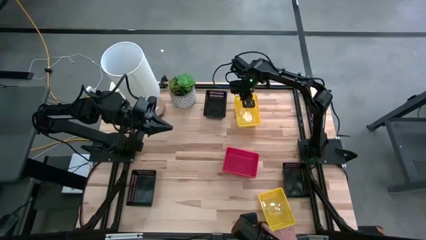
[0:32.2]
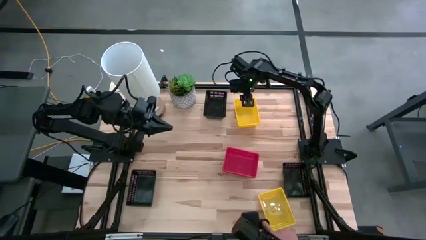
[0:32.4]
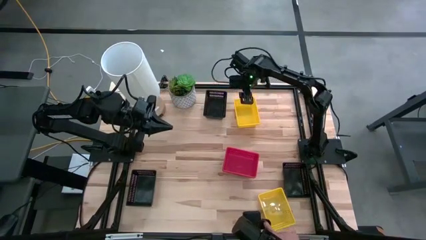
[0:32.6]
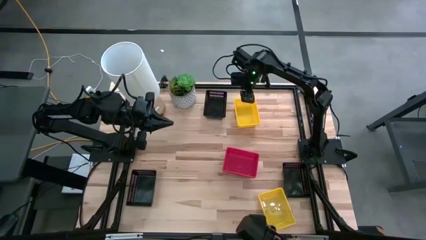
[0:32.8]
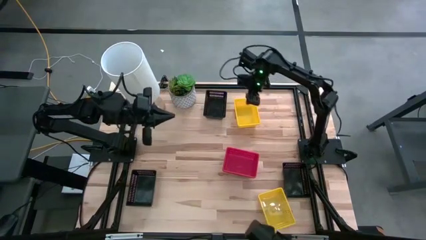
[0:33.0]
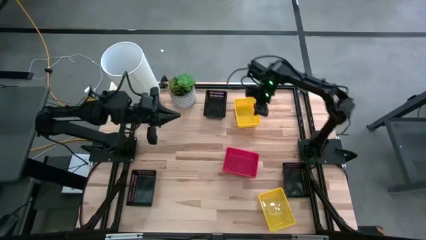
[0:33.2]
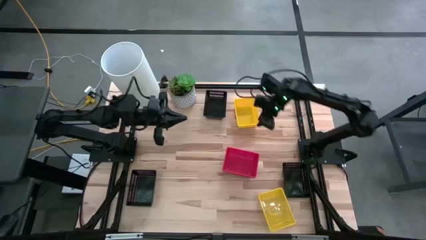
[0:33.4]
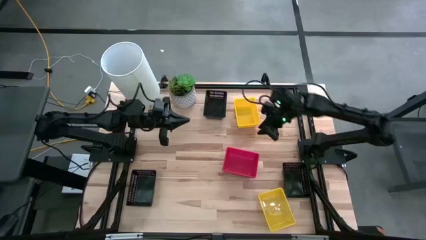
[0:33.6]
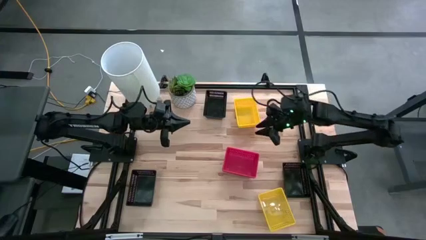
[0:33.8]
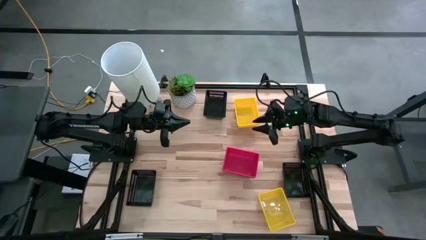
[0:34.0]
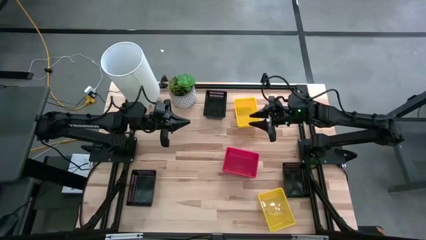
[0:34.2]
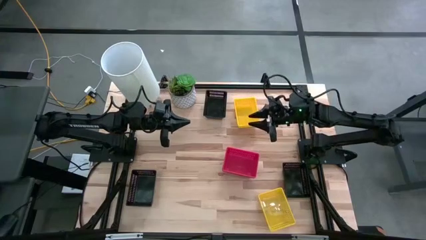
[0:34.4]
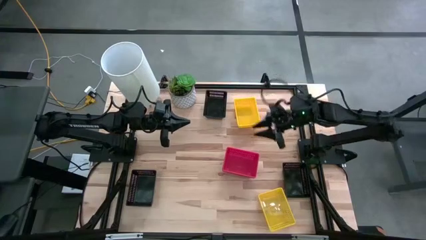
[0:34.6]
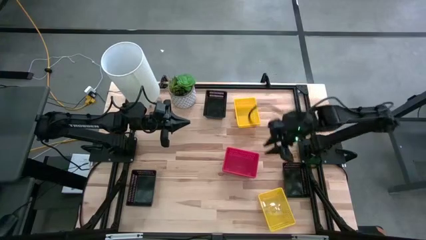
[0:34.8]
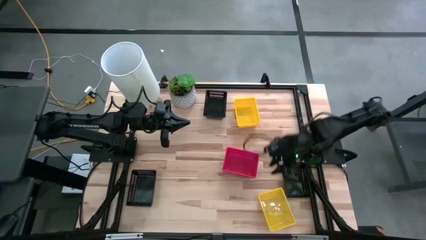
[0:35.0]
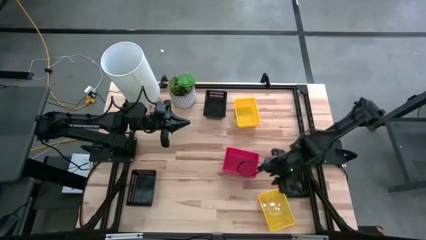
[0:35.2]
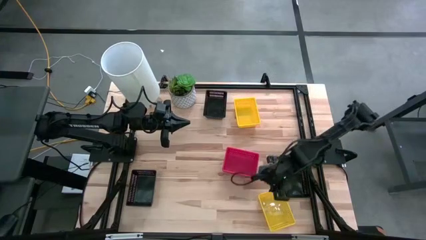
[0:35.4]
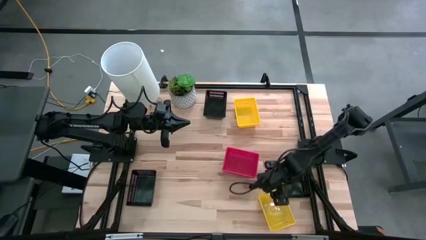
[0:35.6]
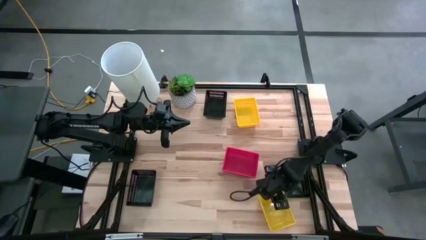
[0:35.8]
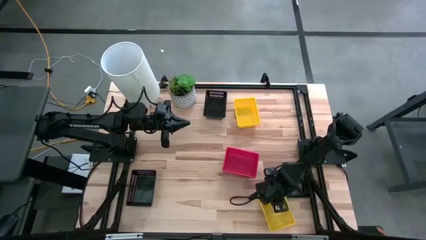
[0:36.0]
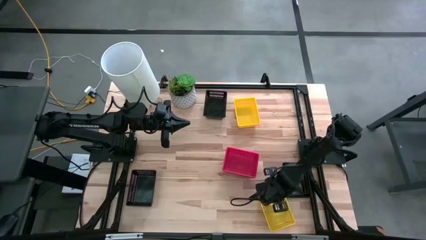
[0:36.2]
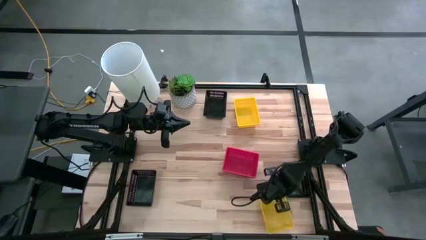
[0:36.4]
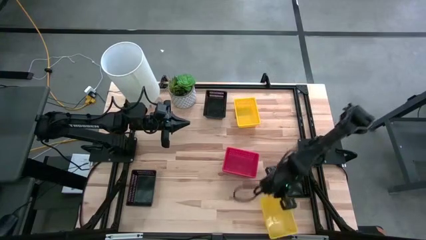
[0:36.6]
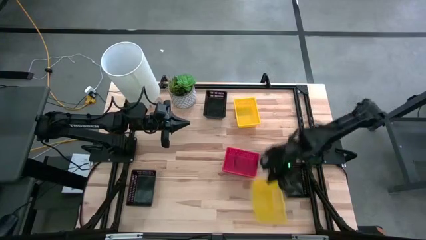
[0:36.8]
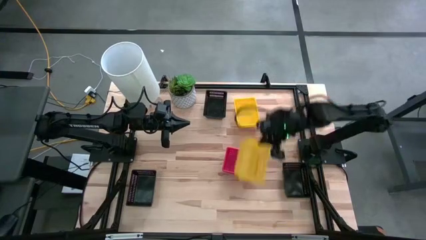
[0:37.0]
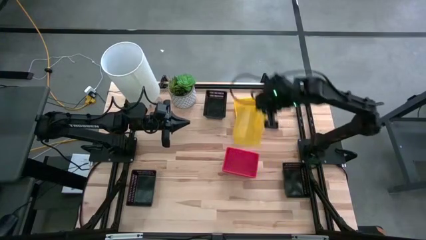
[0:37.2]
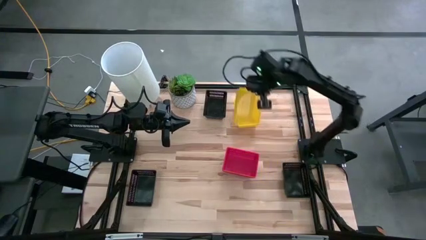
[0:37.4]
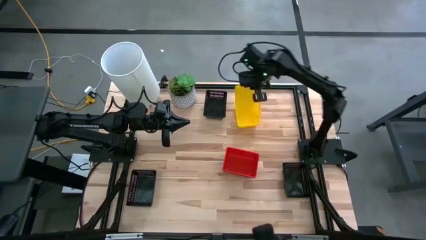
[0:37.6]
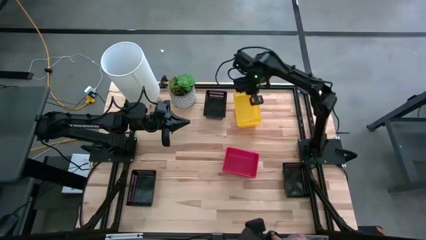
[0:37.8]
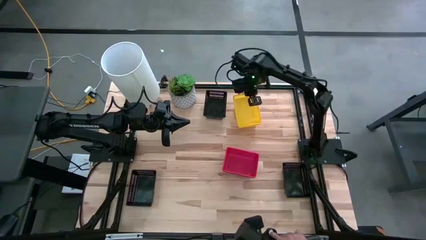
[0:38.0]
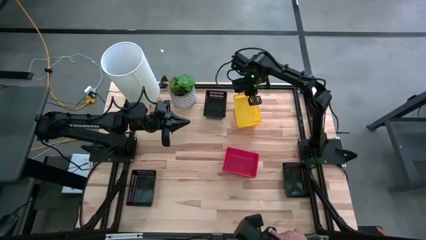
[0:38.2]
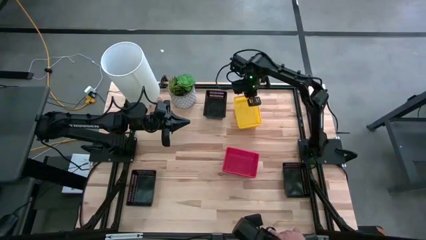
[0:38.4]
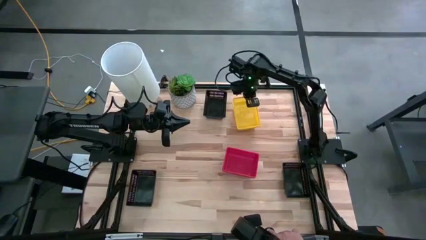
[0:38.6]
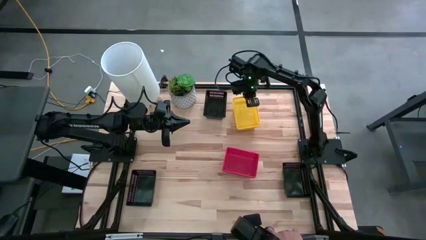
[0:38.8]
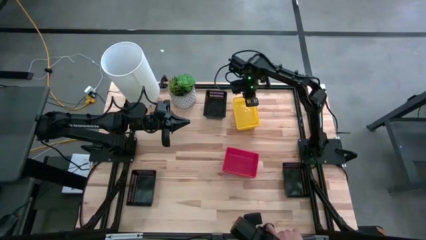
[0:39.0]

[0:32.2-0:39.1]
Stack the bottom yellow bin on top of the top yellow bin on the table

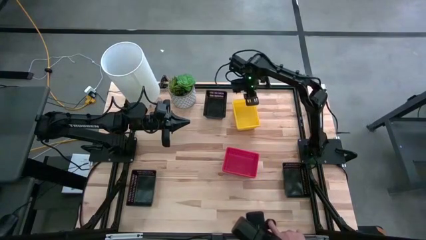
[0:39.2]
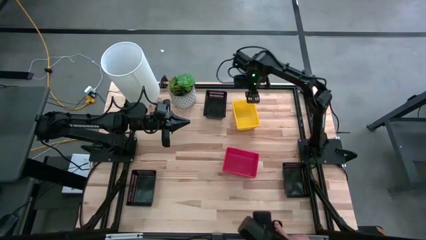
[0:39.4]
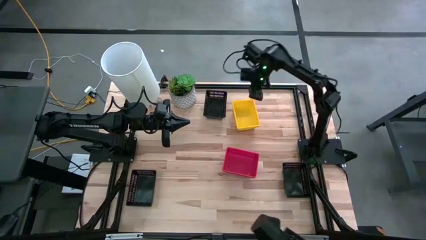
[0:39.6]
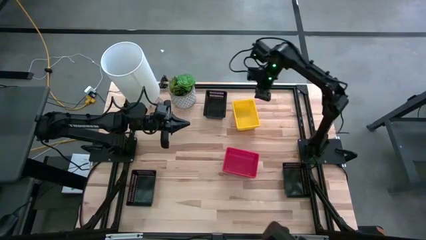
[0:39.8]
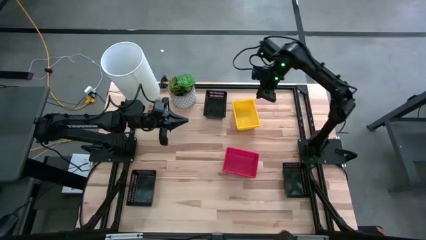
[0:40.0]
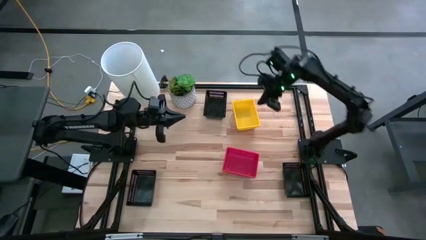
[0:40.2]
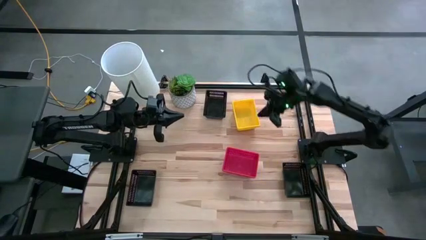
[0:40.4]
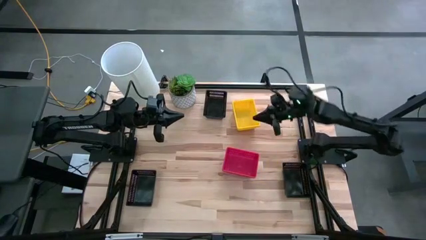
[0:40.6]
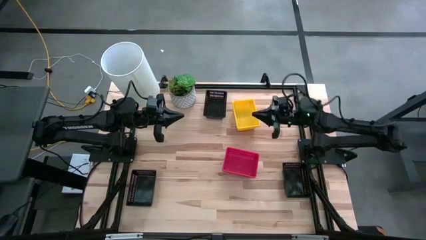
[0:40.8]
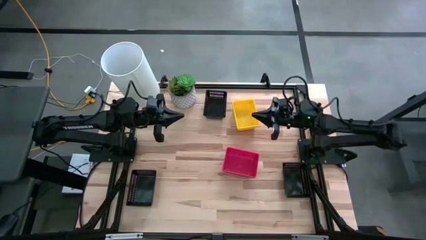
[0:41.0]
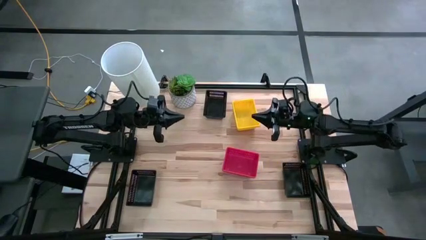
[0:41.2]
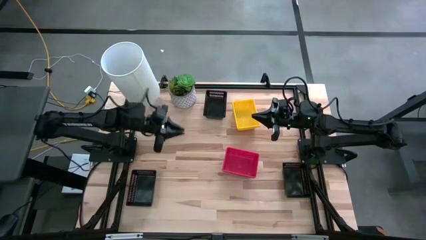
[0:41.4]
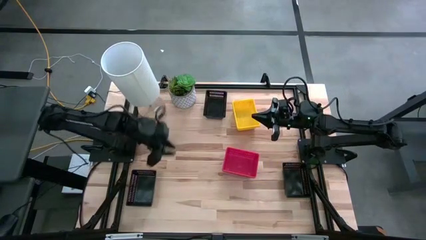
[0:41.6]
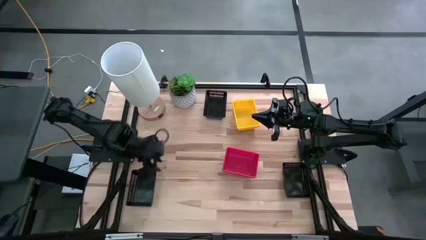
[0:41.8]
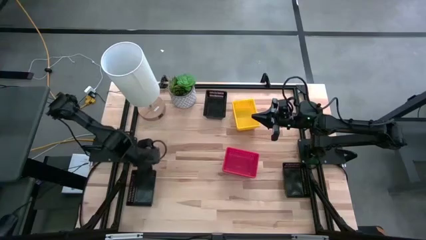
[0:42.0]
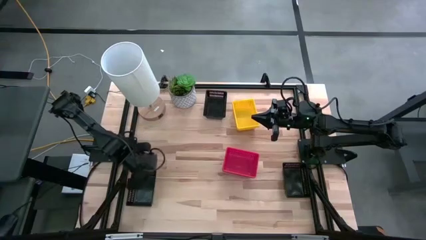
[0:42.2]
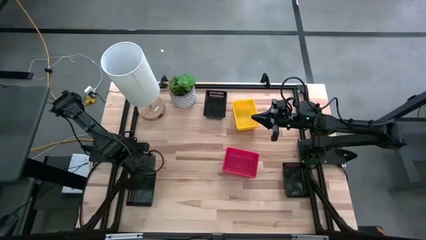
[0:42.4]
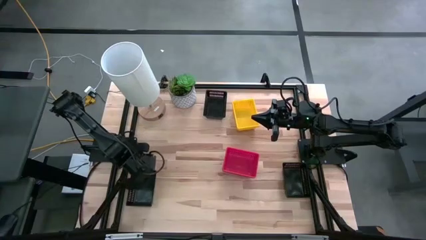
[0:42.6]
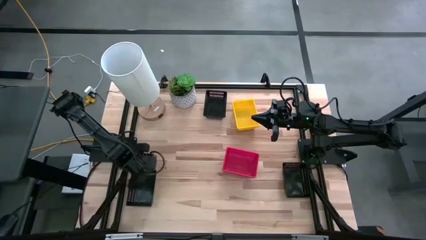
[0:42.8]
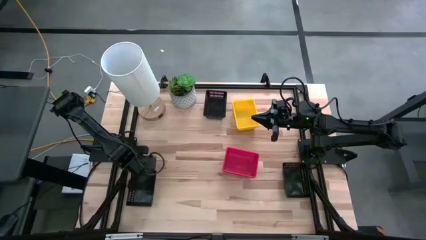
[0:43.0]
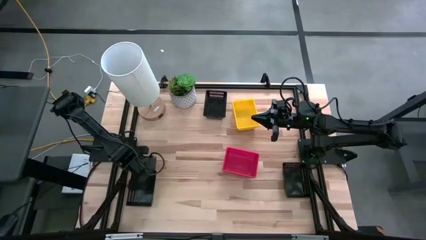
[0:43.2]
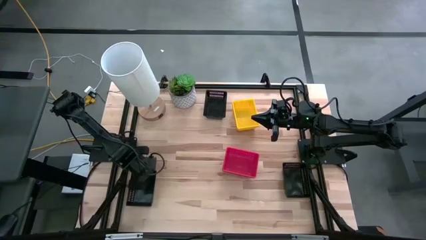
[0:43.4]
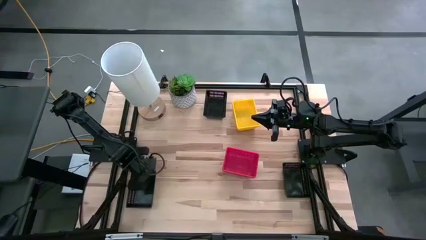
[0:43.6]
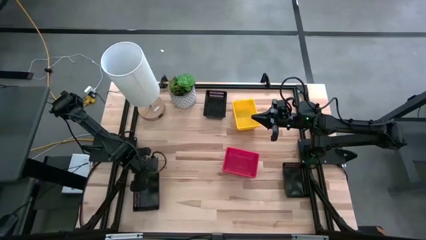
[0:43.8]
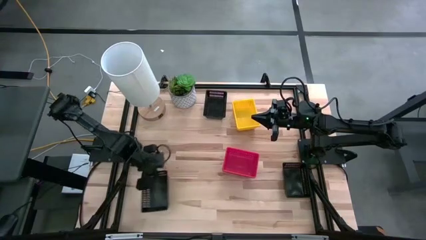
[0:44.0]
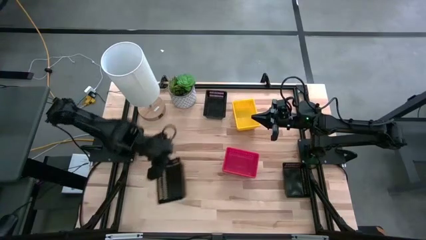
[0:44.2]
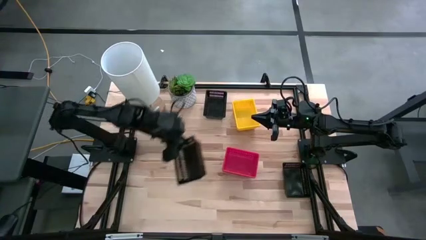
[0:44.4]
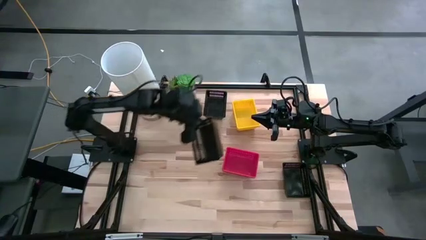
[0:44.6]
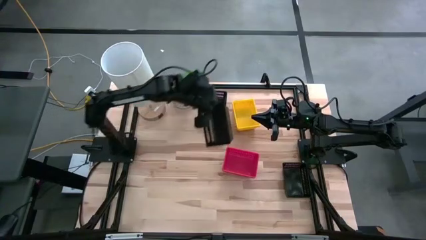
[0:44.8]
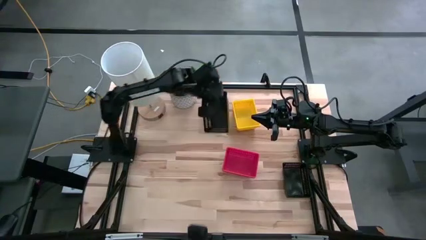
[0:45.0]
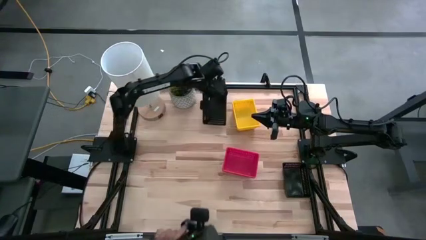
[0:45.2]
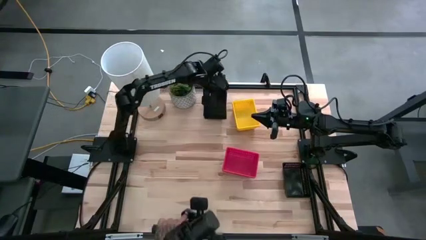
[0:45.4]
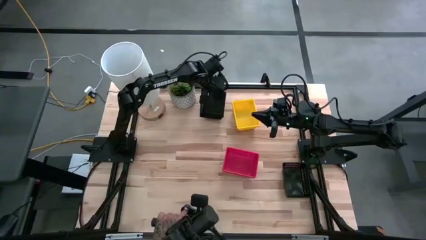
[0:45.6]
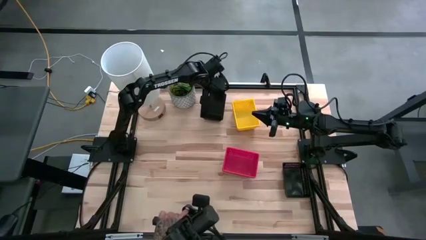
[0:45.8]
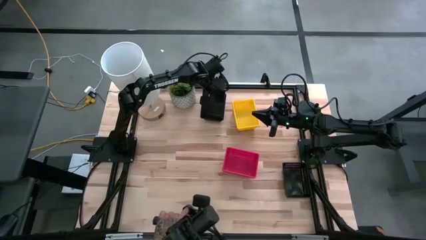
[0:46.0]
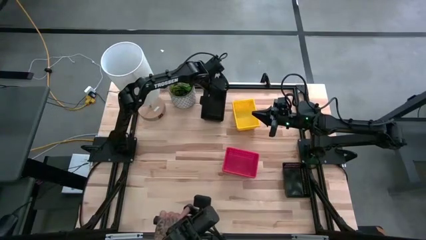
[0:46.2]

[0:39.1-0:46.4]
Stack the bottom left black bin on top of the top black bin on the table

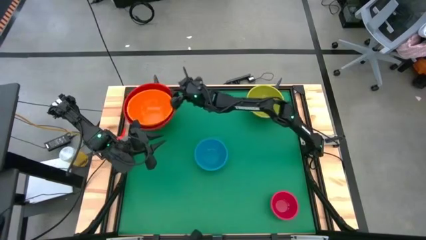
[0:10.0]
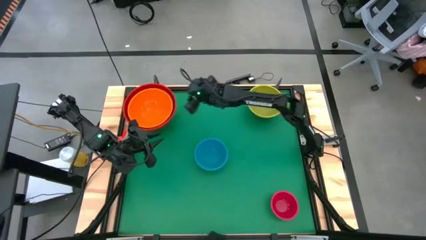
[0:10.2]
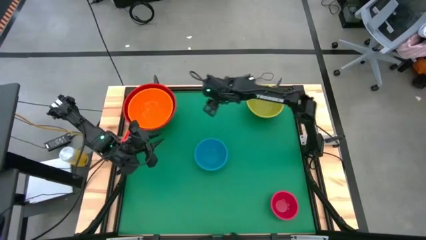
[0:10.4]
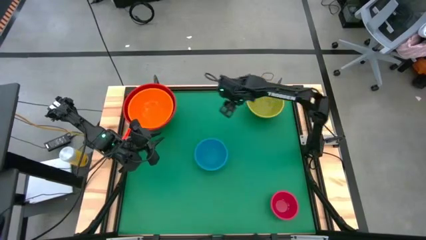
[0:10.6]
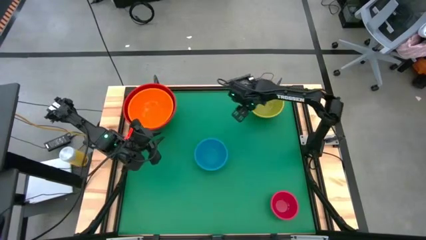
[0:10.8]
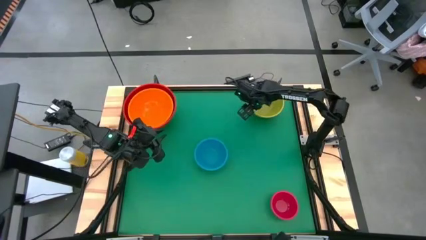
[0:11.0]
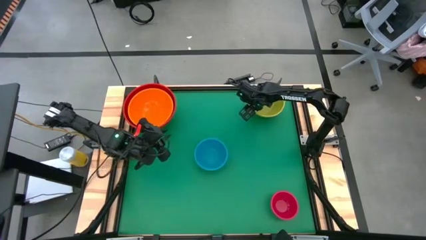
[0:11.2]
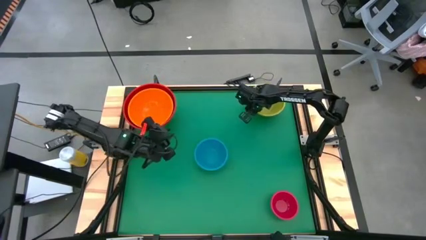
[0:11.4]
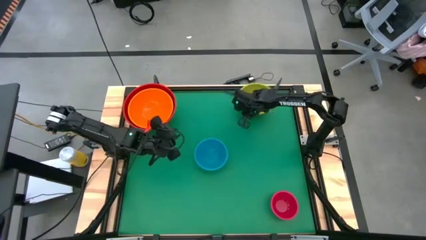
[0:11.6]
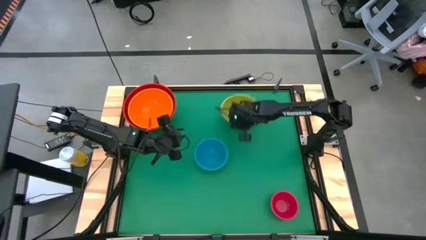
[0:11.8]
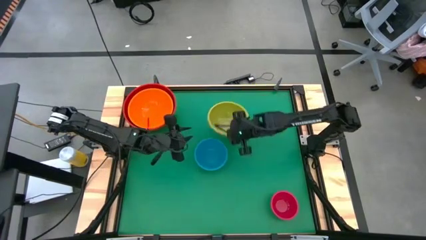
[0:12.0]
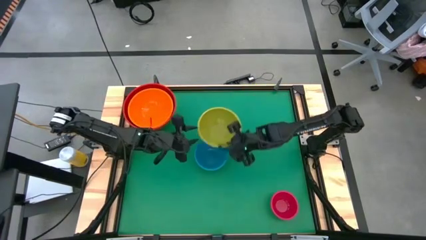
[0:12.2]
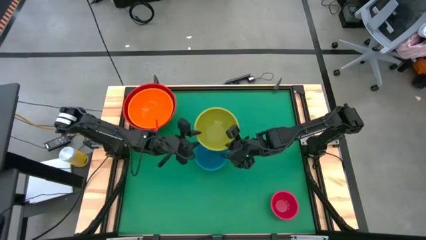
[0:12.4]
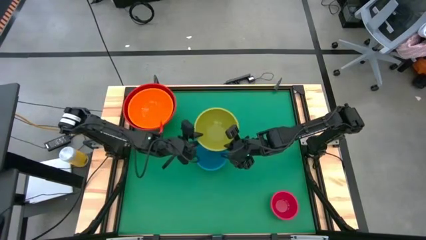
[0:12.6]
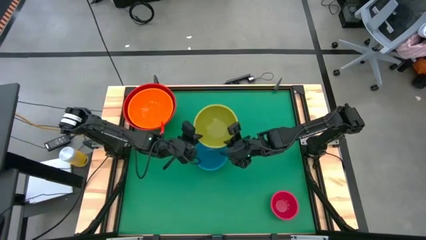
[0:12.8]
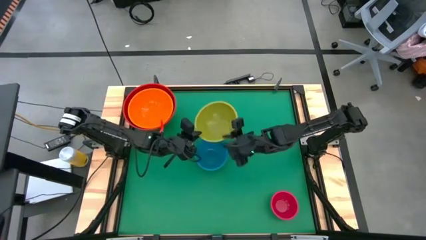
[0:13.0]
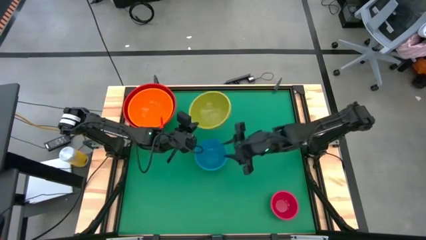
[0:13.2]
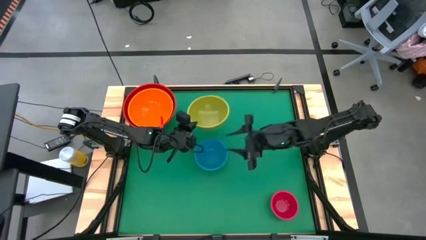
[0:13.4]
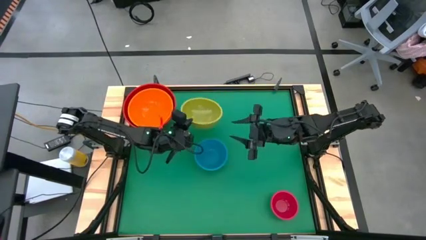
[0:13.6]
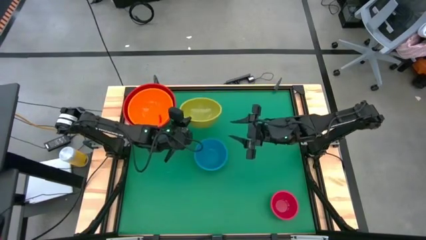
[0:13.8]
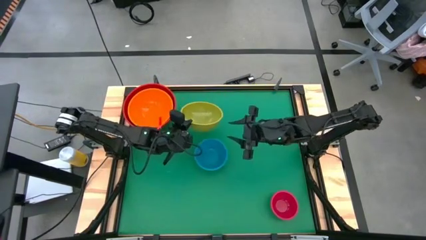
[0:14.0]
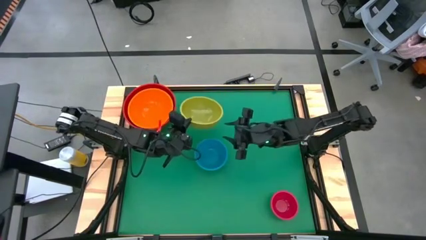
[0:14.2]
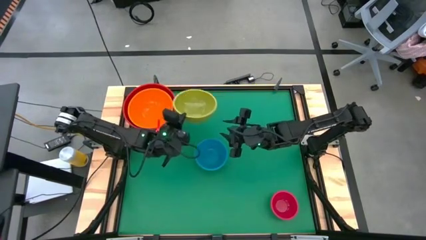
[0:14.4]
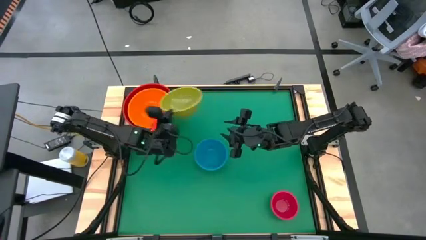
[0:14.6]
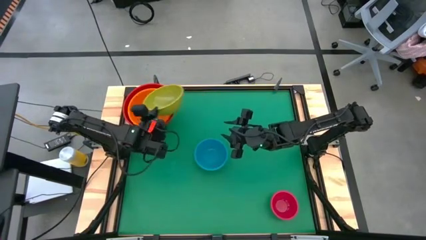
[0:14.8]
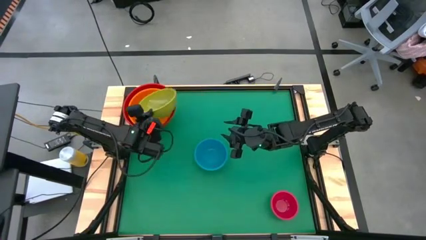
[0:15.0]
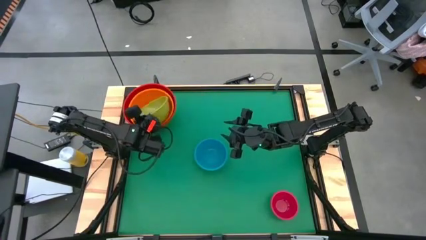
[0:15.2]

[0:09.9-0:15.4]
Stack the green bowl on top of the orange bowl
